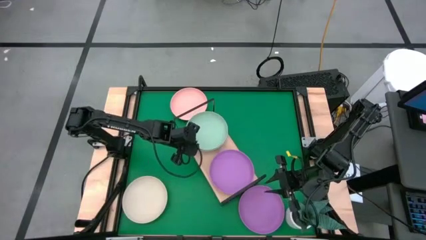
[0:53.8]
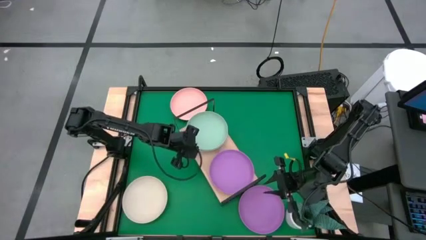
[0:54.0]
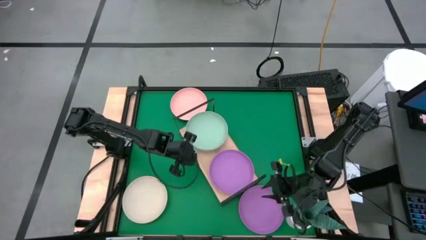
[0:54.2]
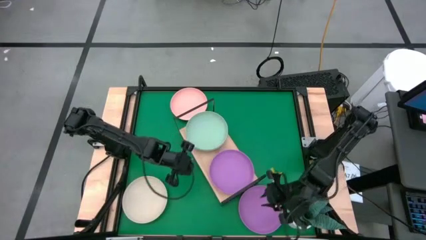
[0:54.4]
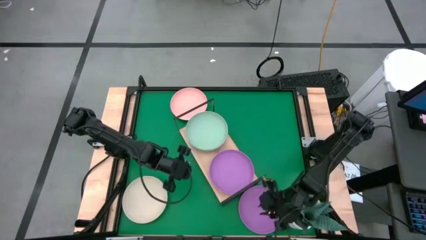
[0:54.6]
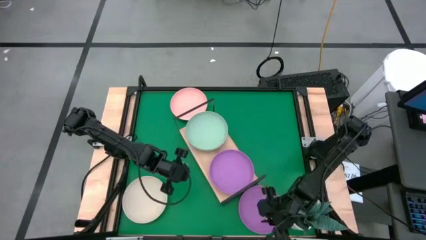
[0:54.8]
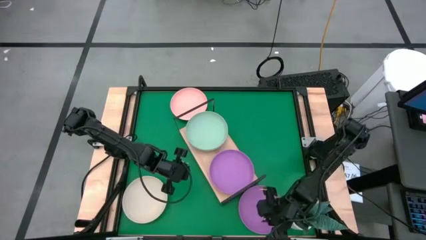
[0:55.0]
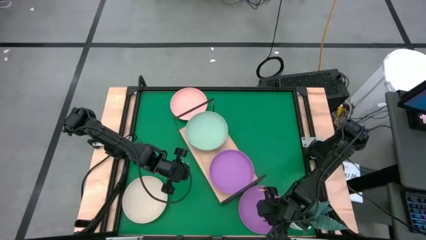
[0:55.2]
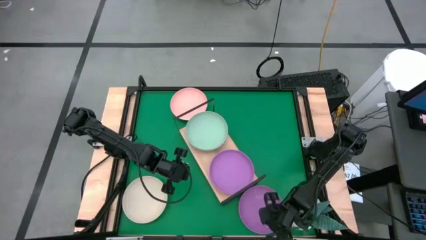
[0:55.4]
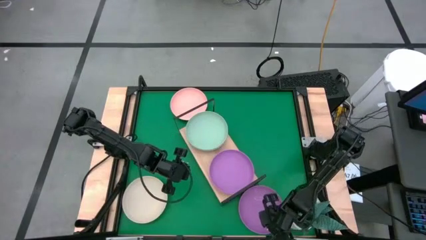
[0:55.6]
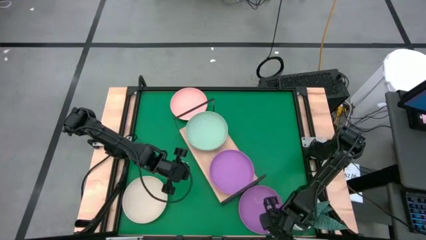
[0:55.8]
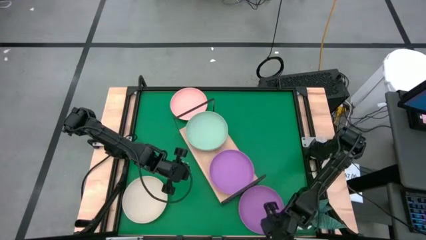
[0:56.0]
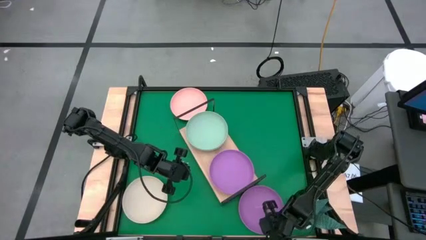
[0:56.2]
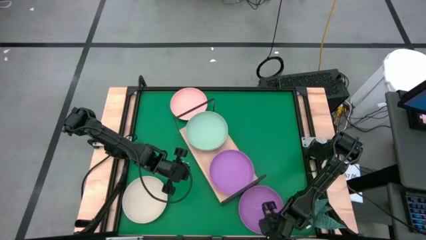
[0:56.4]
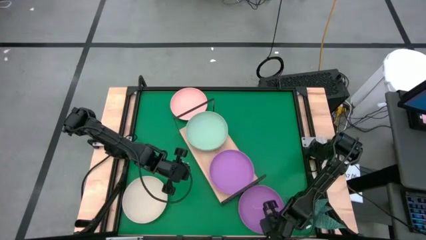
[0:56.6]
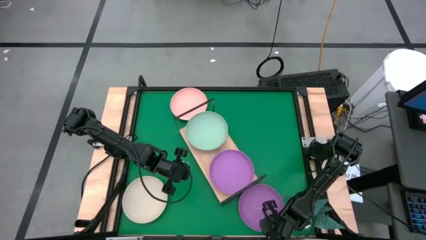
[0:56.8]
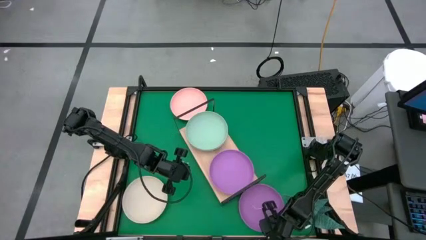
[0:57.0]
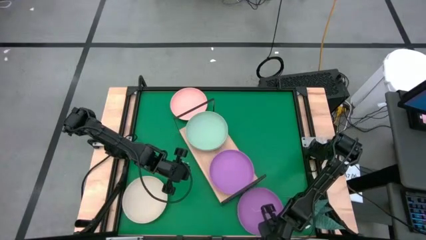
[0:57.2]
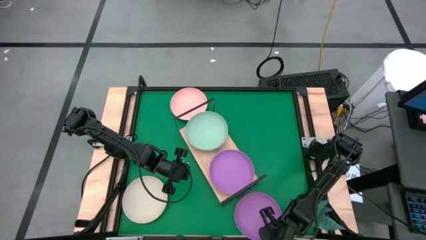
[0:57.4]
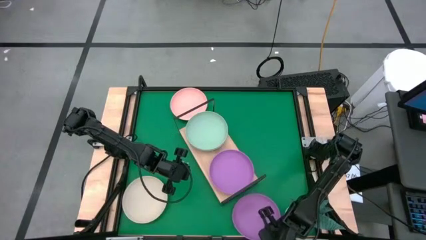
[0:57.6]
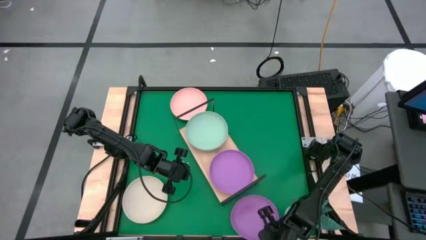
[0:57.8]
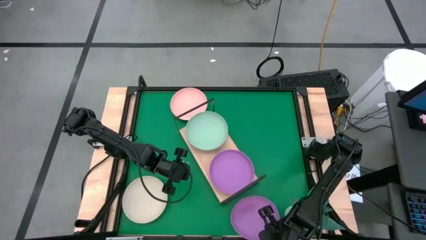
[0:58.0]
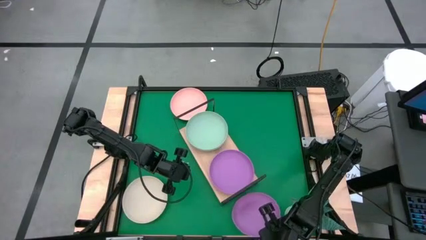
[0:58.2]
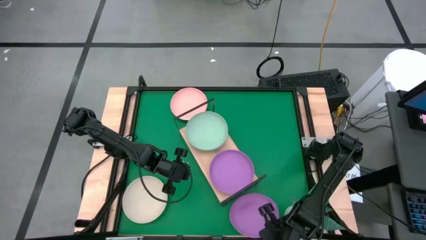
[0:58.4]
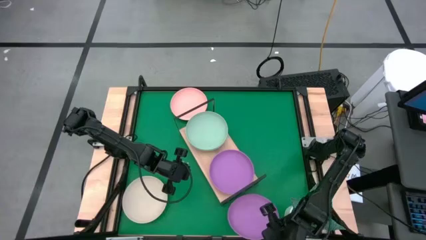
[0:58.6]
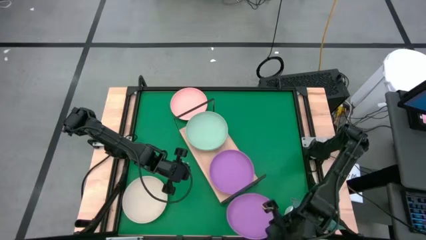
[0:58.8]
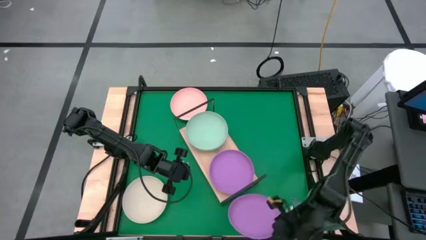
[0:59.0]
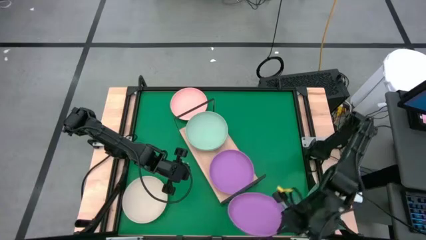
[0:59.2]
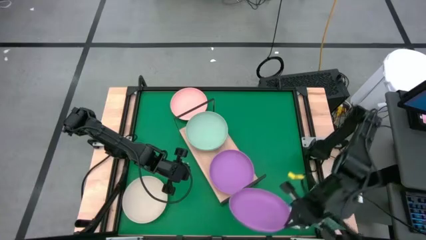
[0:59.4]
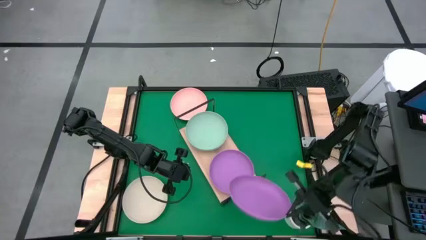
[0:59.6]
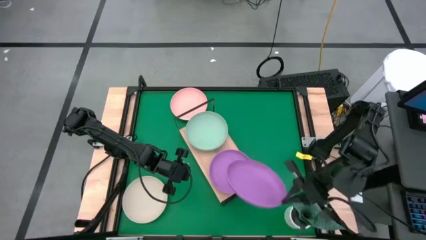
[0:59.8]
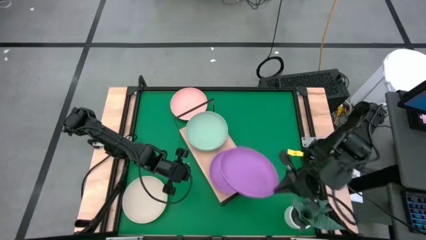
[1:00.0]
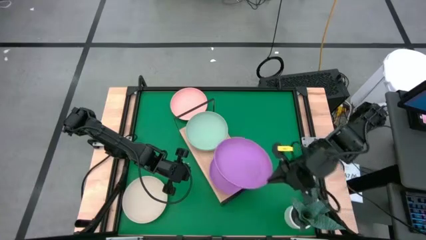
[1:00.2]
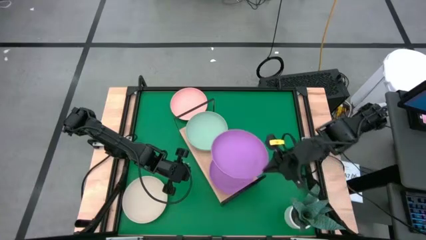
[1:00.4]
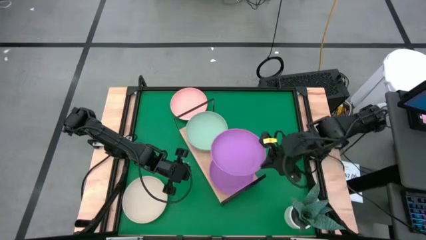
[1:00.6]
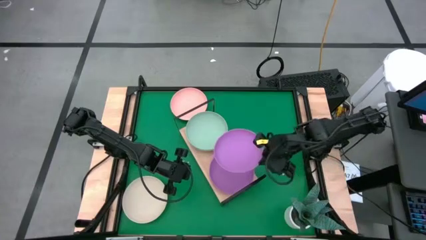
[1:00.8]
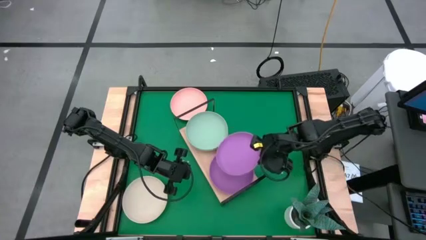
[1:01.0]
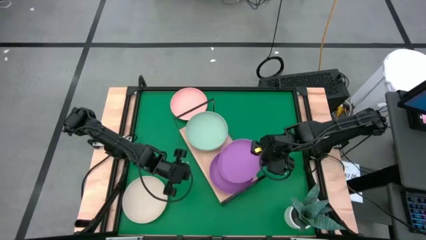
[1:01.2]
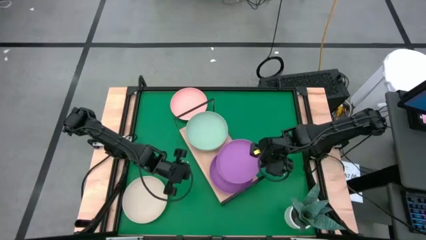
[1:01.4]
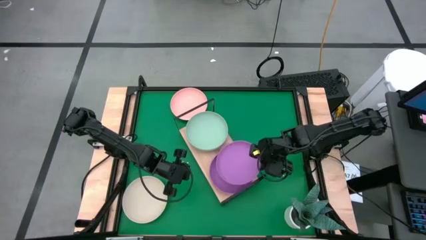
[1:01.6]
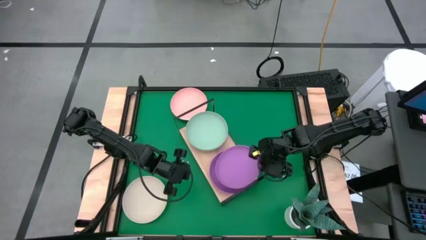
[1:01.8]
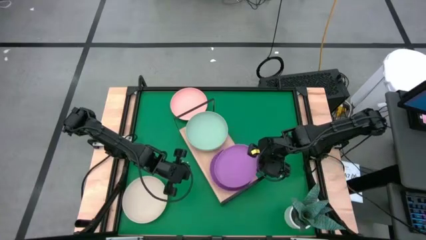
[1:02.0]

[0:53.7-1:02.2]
Task: Place and stack plates onto a shelf
Stack the violet plate on top of the violet plate on the shelf

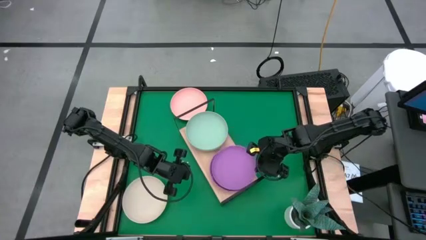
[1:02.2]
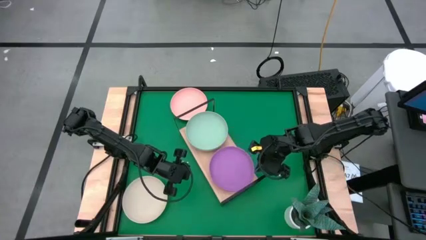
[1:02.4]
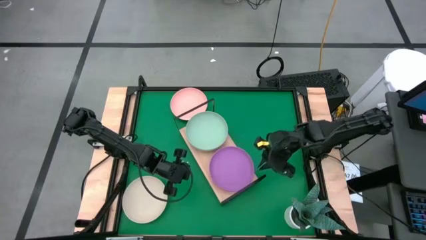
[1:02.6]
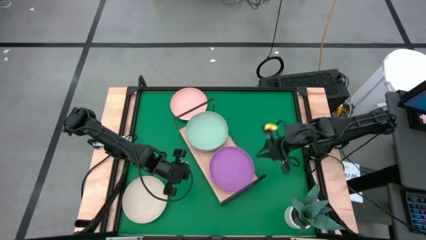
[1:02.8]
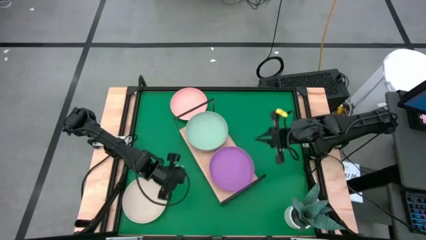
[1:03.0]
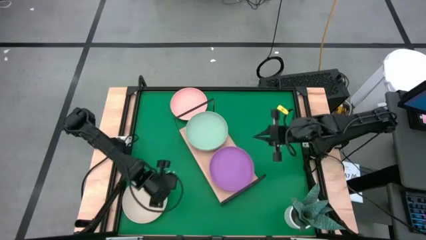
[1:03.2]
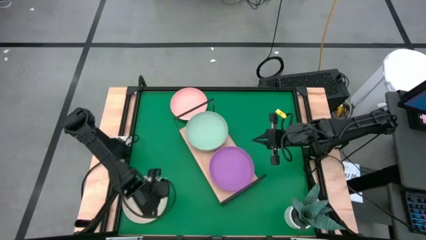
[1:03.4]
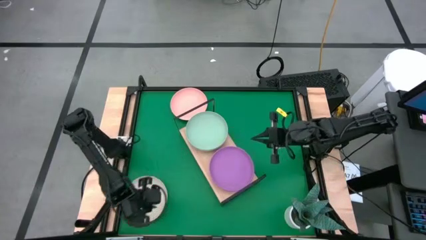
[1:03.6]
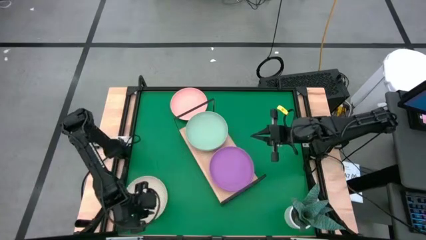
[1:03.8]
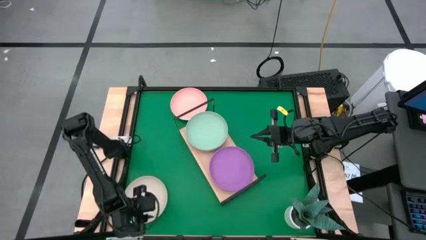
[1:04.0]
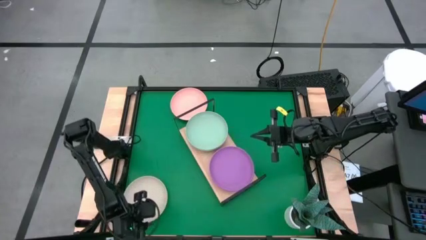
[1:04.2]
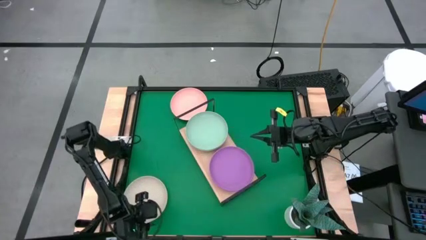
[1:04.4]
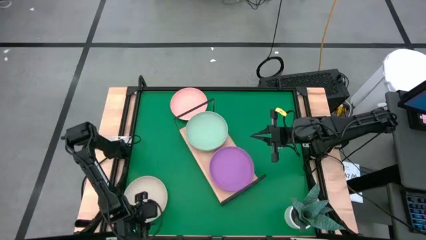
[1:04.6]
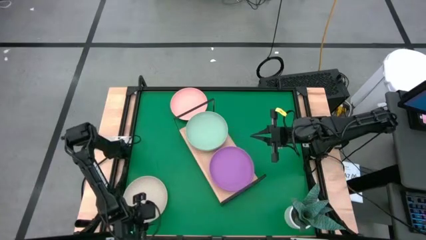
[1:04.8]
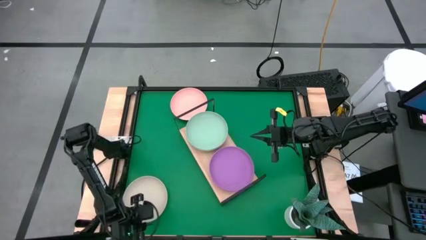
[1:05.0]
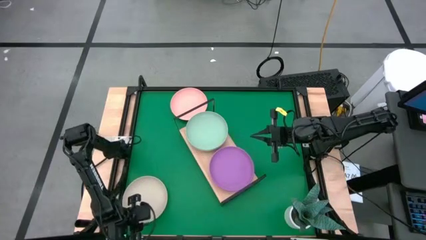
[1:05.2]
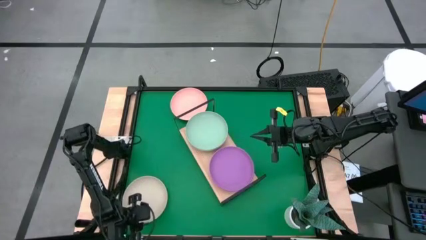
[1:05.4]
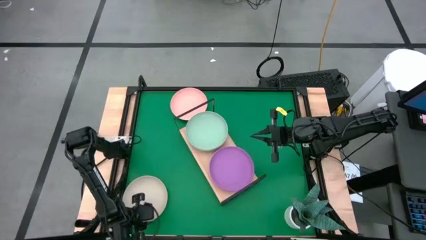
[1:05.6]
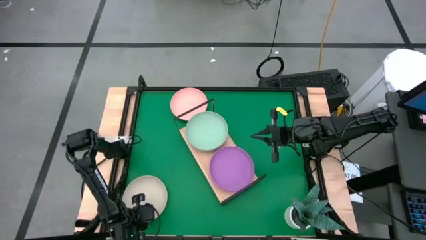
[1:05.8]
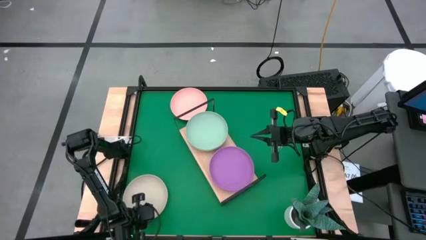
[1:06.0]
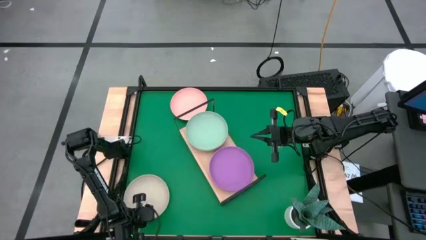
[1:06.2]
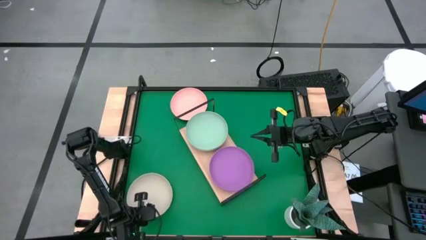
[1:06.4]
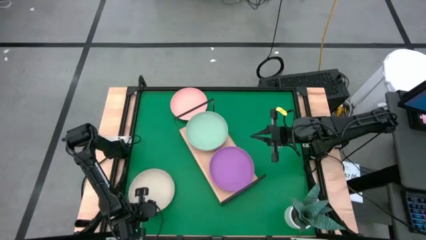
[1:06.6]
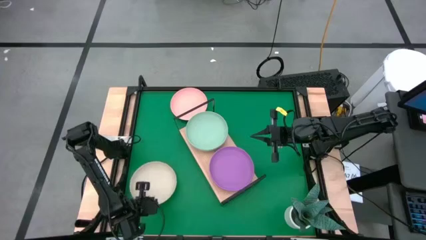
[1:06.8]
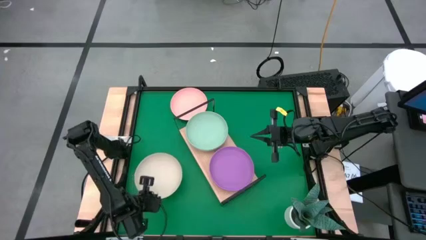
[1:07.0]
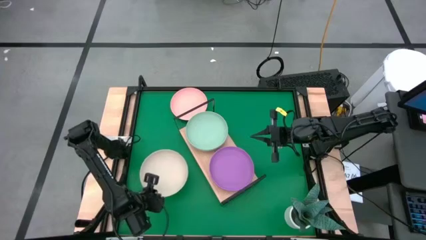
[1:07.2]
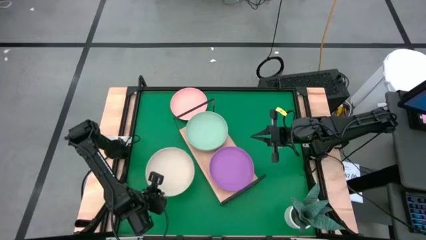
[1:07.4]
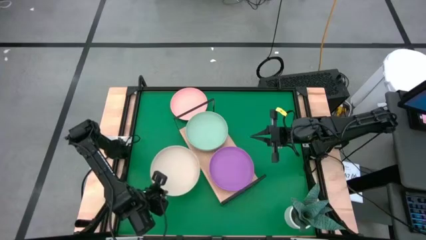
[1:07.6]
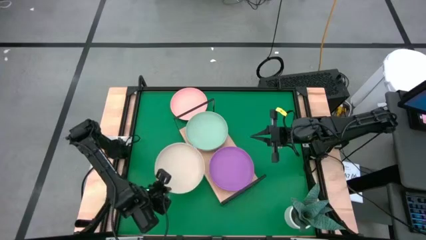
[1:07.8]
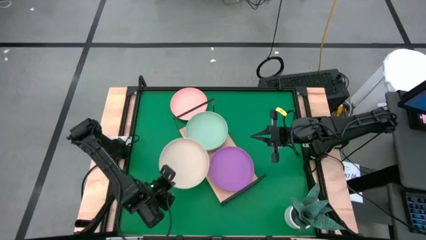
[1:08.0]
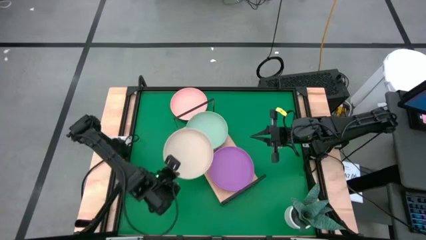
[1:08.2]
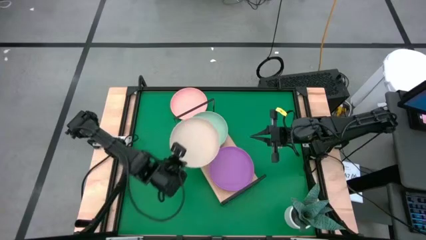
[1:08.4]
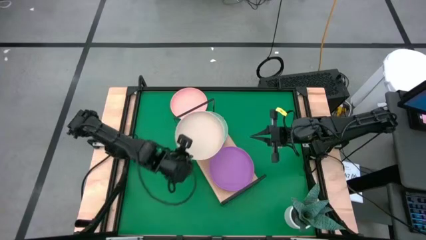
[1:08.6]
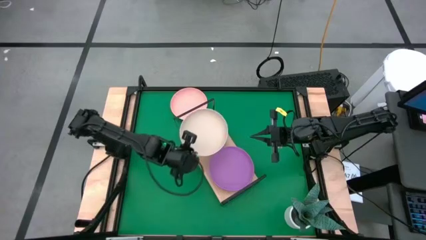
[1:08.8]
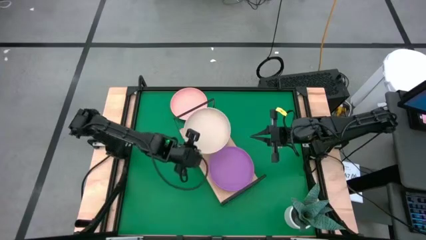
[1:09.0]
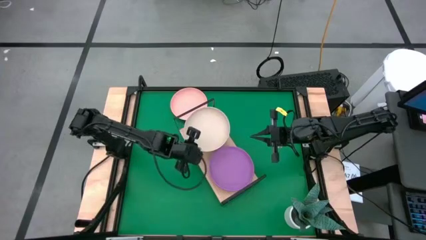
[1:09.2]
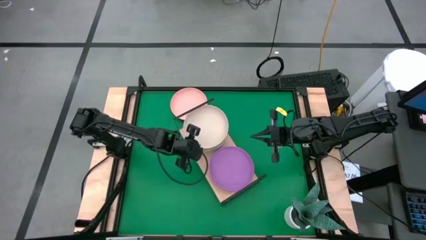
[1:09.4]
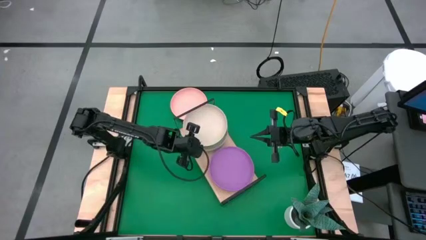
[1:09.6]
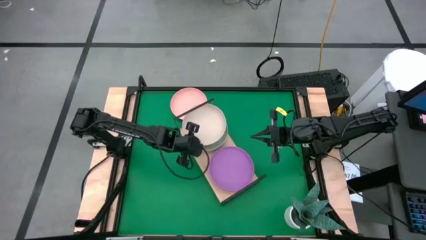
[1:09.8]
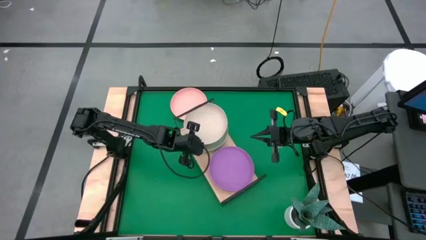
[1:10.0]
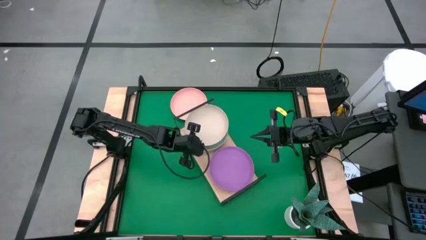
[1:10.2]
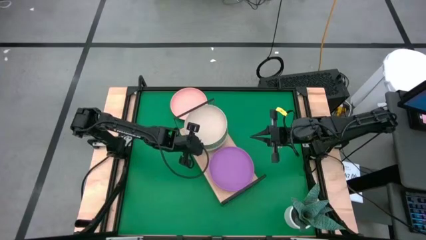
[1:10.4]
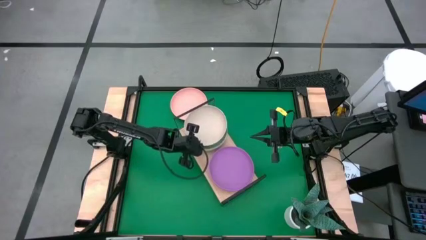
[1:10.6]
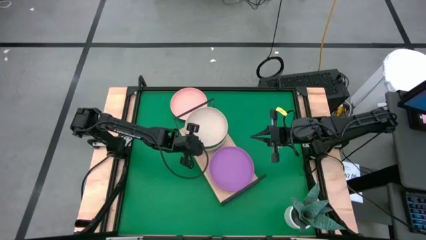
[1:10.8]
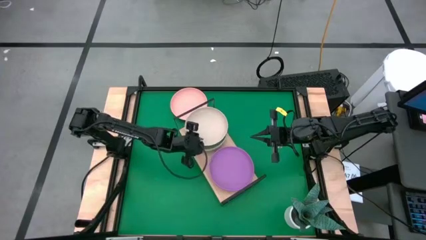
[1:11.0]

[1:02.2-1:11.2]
Stack the white plate on top of the green plate on the shelf
